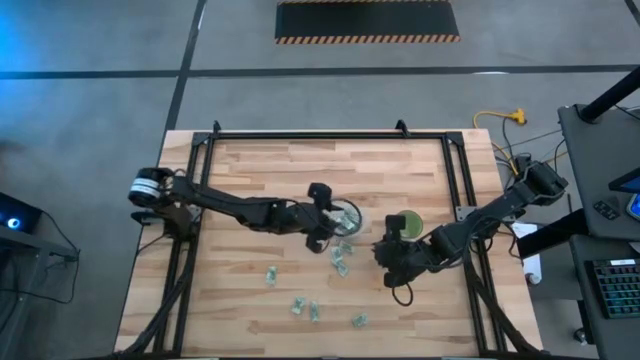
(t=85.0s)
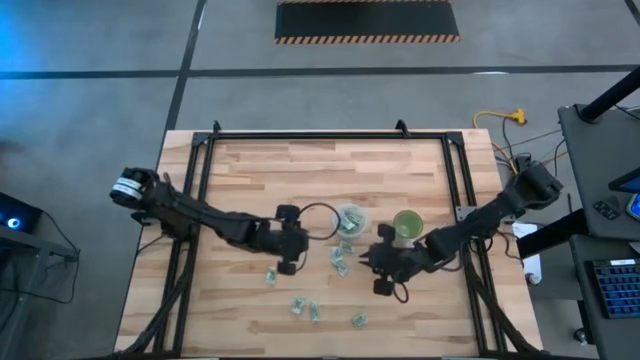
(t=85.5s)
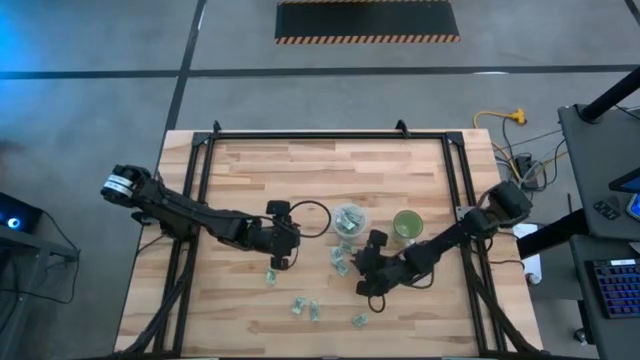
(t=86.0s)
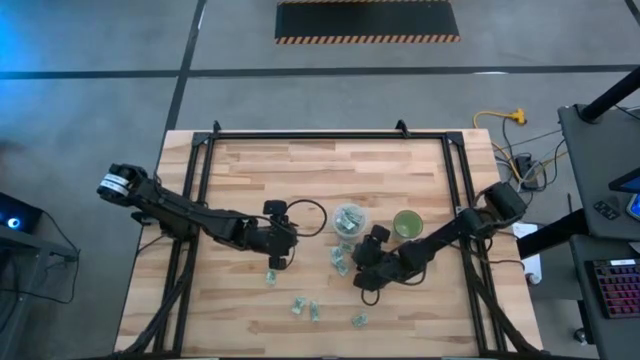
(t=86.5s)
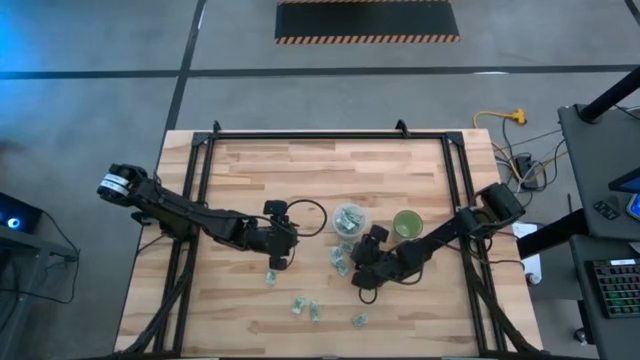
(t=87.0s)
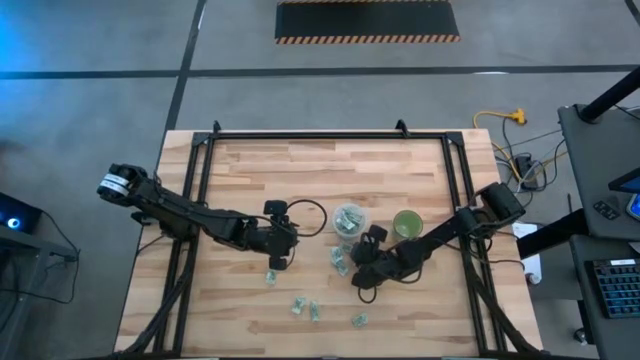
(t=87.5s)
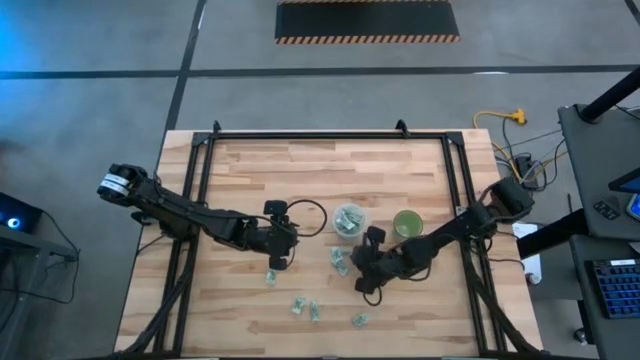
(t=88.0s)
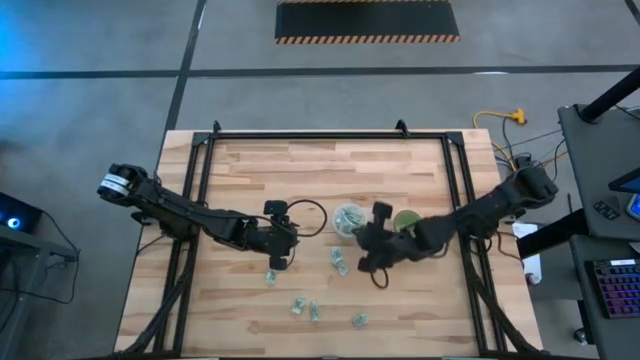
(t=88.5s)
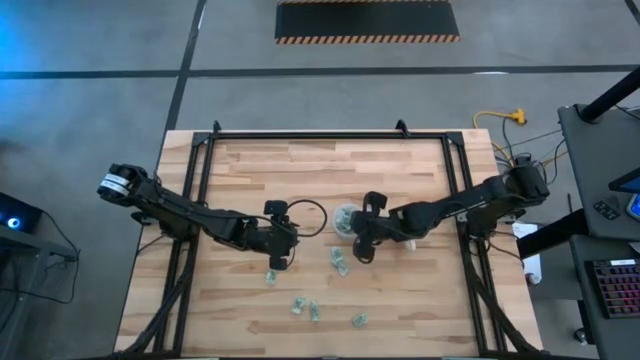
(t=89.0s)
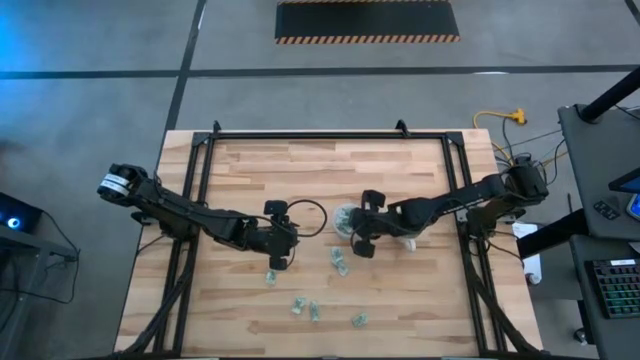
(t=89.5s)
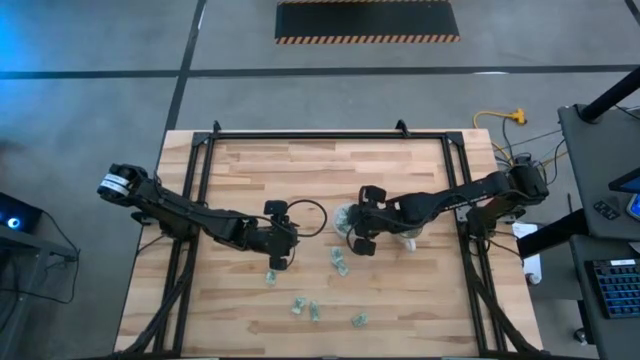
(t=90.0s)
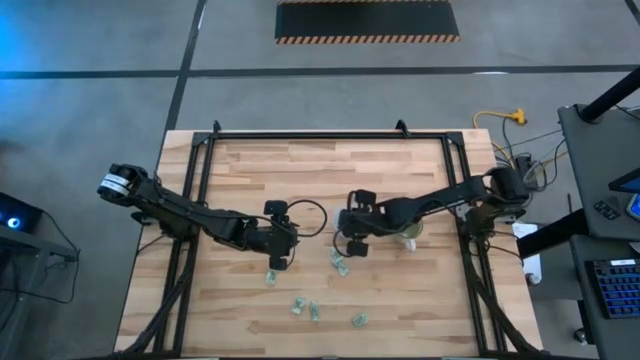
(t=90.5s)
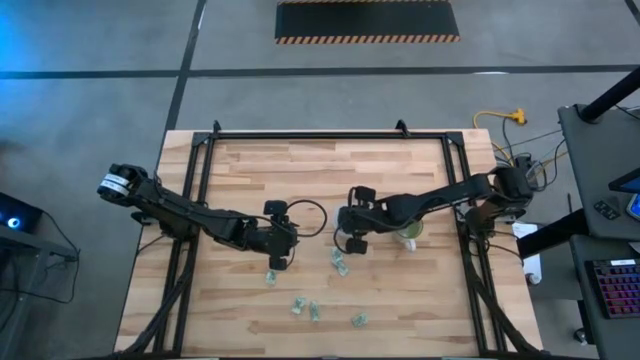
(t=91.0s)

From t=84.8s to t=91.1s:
Task: Pick and place Stevia / Truvia into bins
Put the green stevia packet into the transparent container

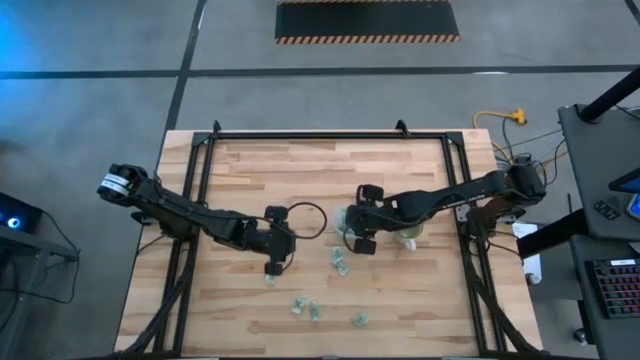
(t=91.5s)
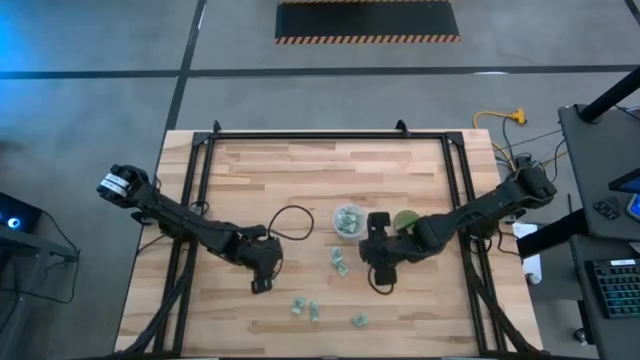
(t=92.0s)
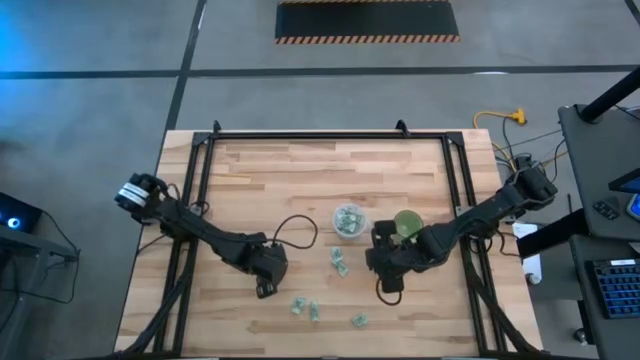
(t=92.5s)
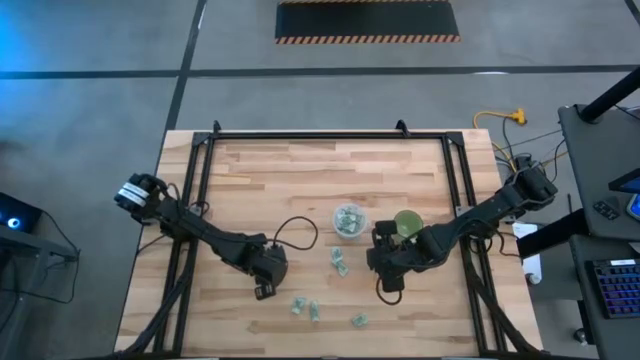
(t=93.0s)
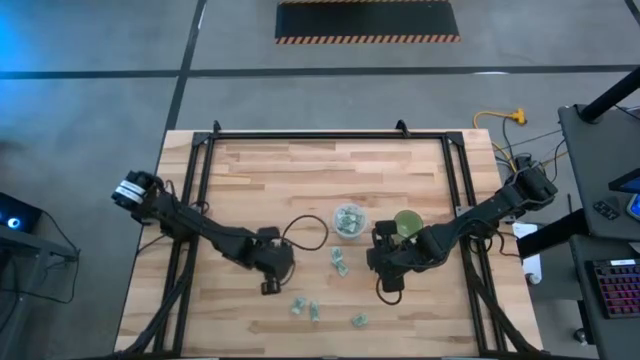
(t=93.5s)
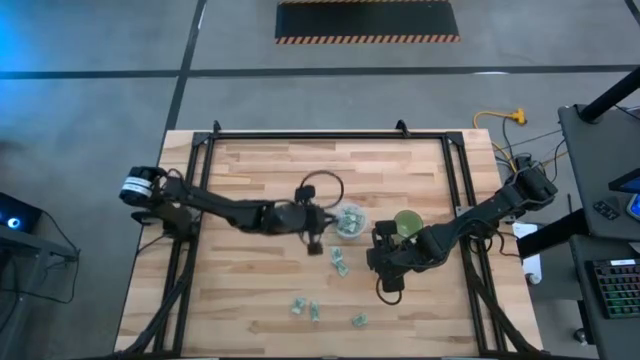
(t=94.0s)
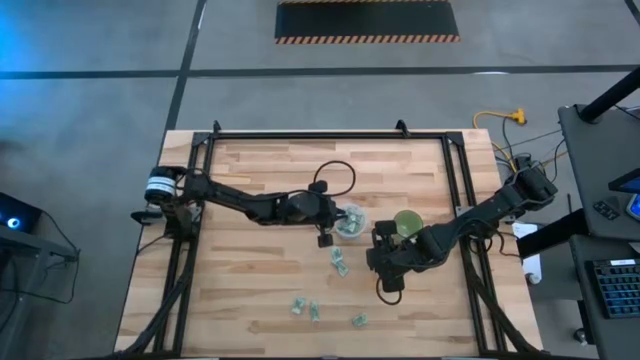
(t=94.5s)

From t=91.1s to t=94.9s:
Put the green stevia packet into the transparent container

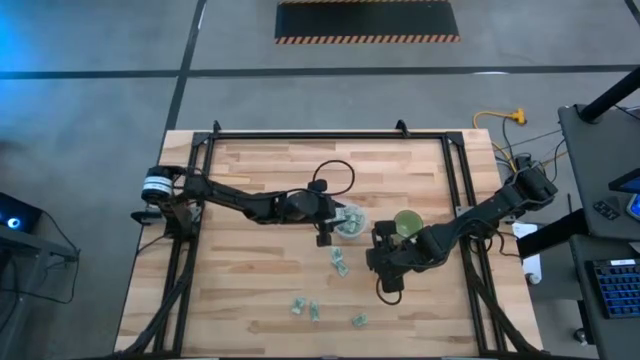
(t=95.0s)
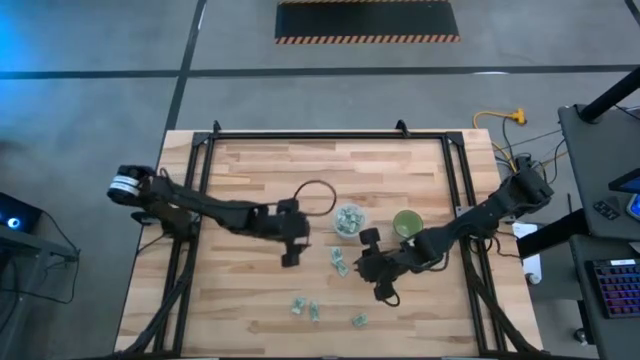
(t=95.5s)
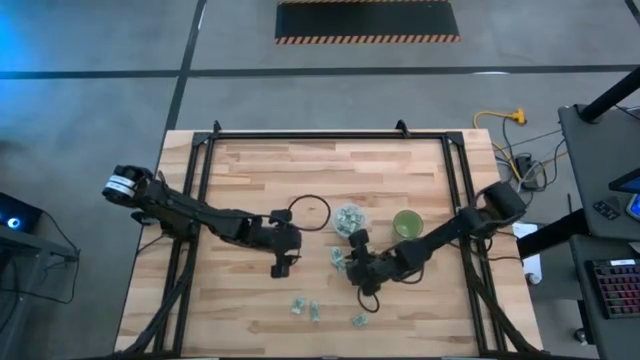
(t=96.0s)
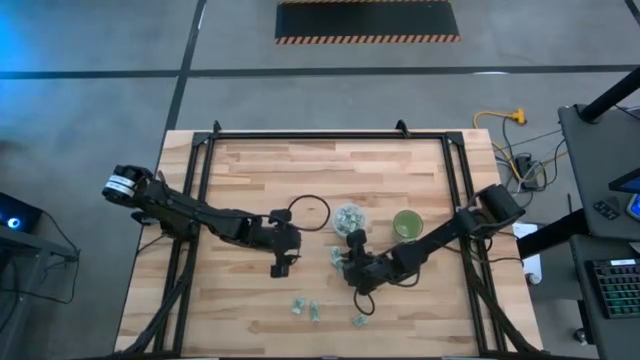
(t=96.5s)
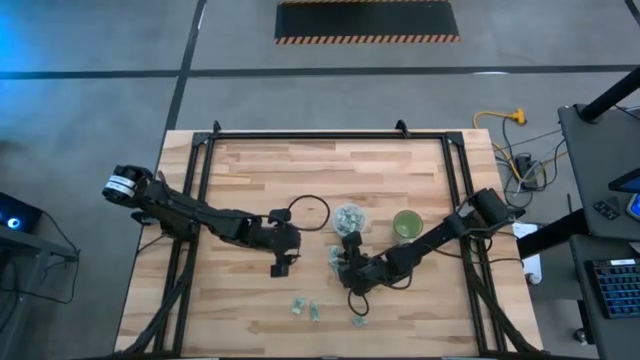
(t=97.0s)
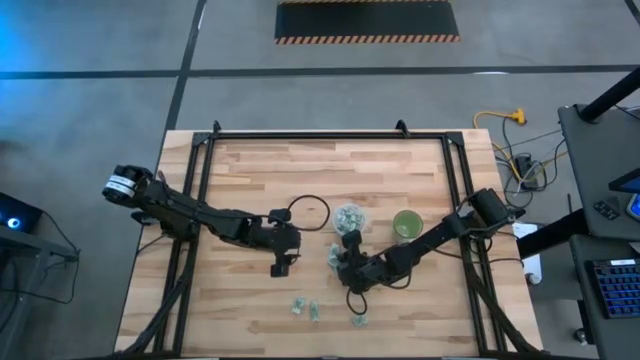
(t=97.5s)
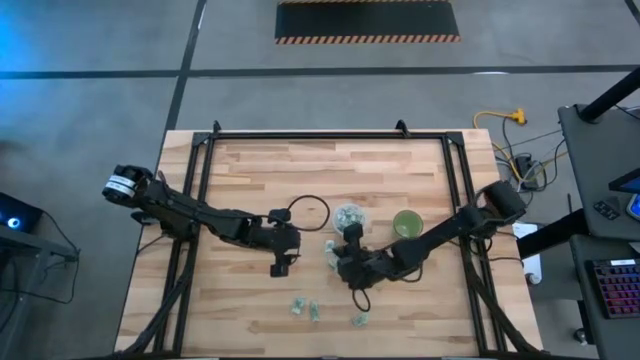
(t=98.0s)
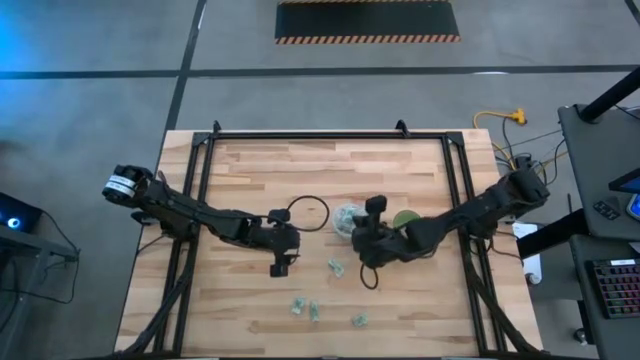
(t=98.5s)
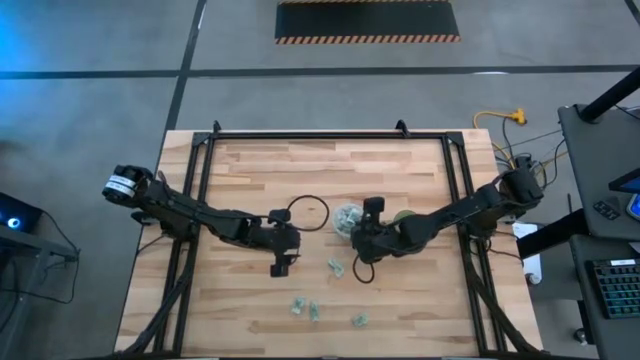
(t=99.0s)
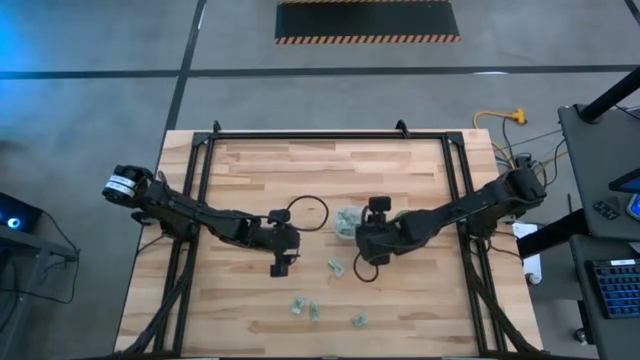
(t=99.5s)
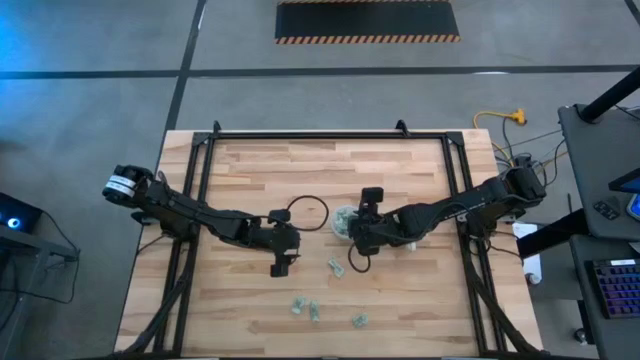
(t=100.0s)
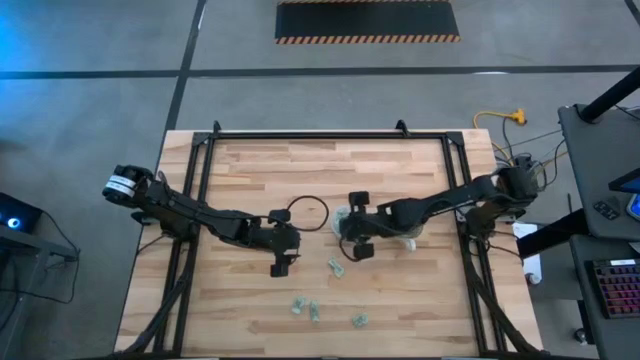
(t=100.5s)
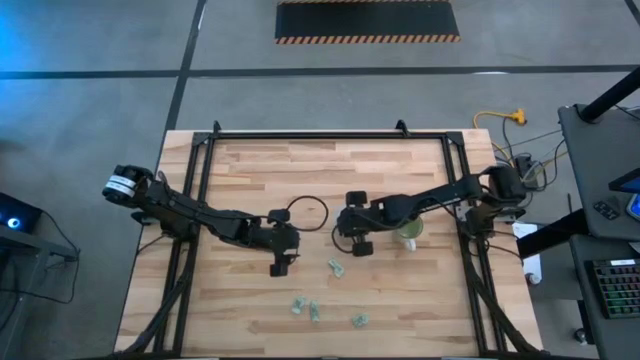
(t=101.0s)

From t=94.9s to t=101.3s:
Put the green stevia packet into the transparent container

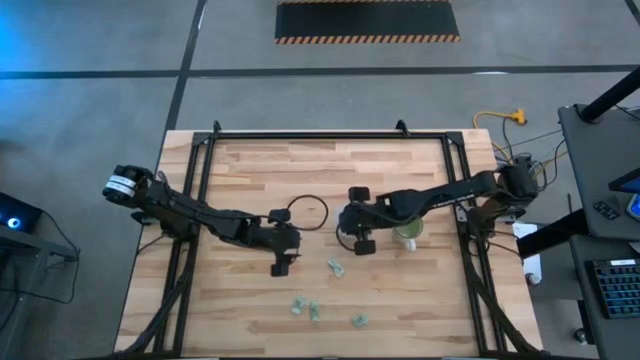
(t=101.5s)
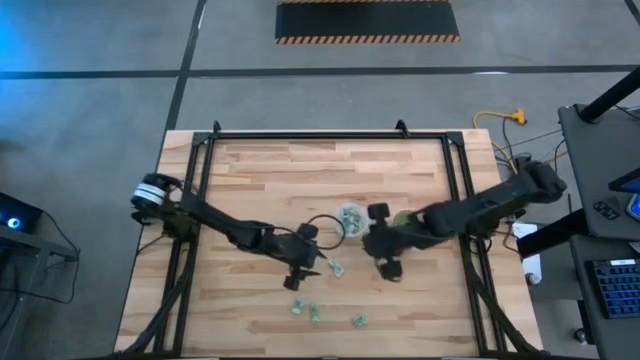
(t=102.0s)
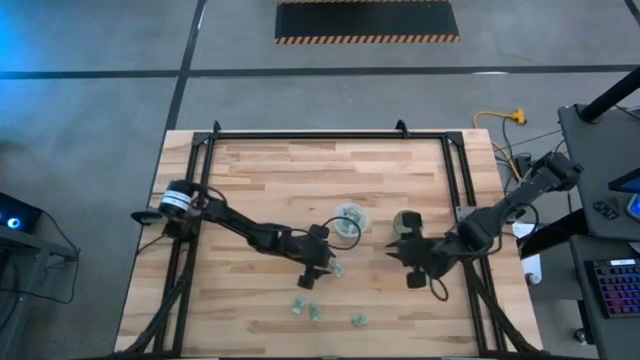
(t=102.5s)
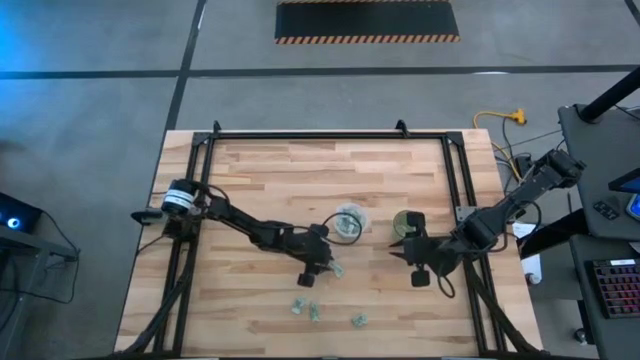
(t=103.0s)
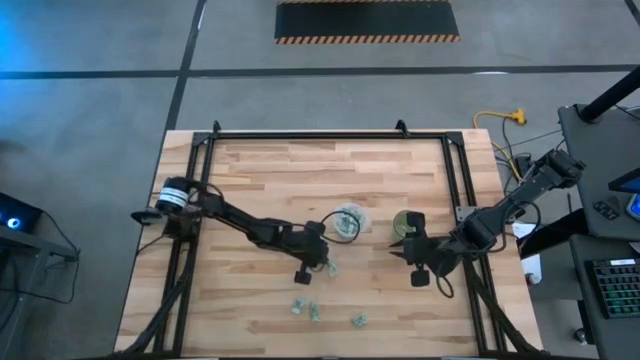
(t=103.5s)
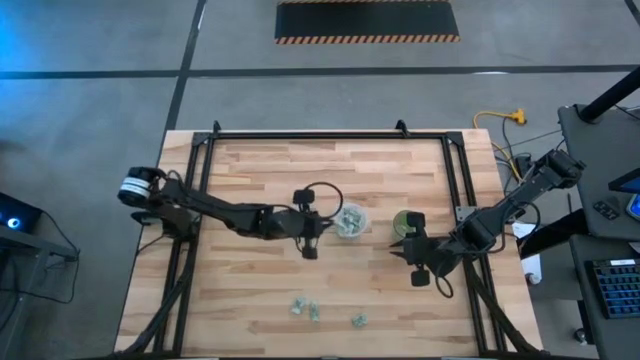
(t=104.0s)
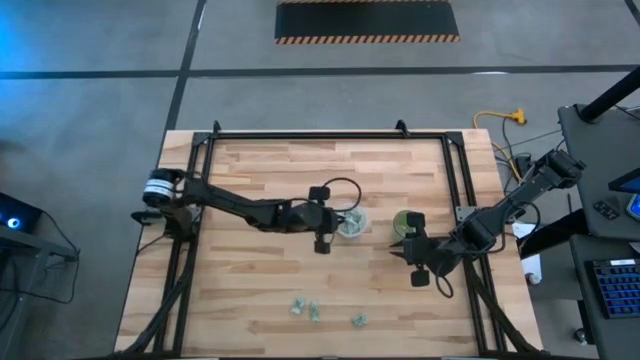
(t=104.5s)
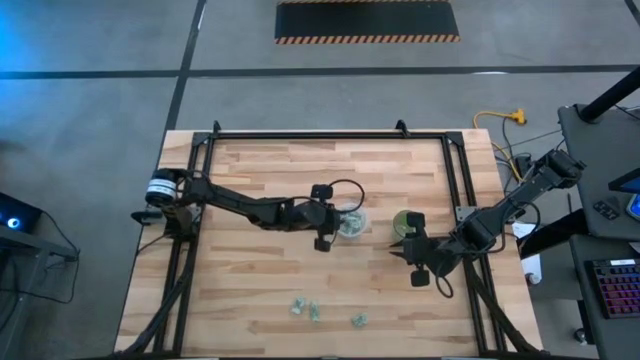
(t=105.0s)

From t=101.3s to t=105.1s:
Put the green stevia packet into the transparent container

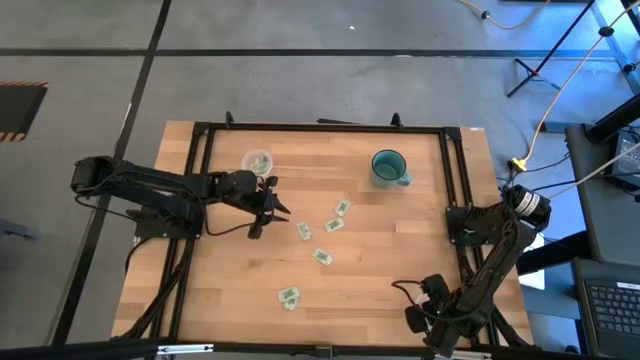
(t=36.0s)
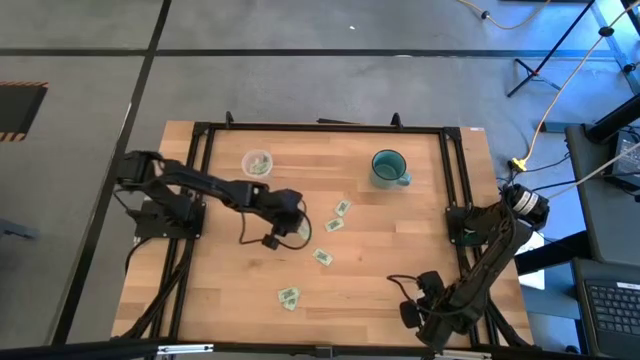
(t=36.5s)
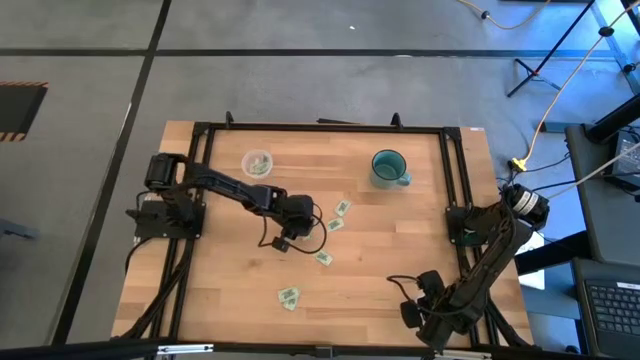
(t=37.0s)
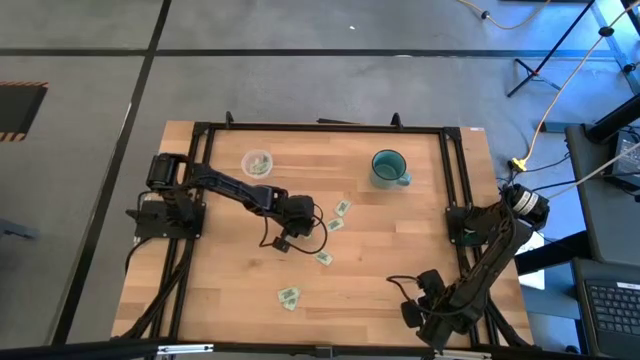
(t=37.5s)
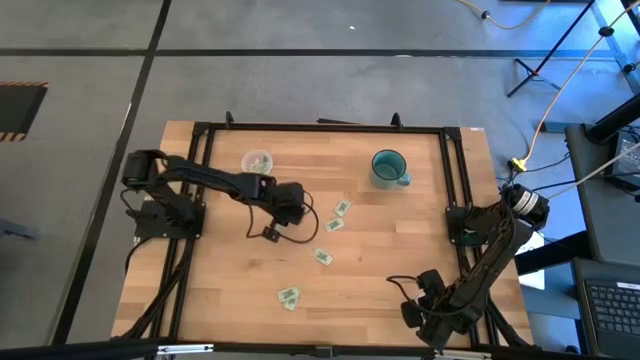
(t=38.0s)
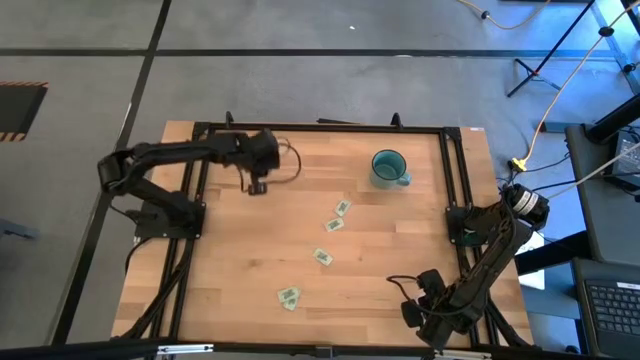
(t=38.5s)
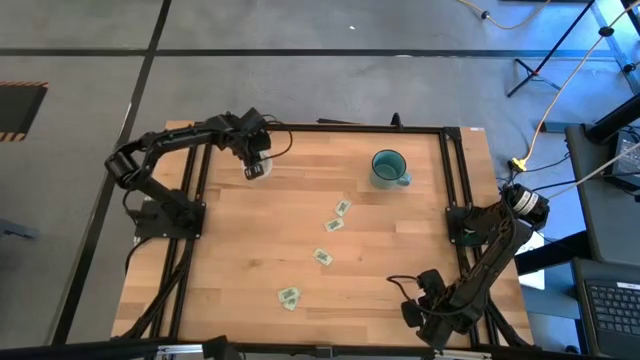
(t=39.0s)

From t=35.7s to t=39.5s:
Task: Pick and place Stevia / Truvia into bins
Put the stevia packet into the top transparent container
